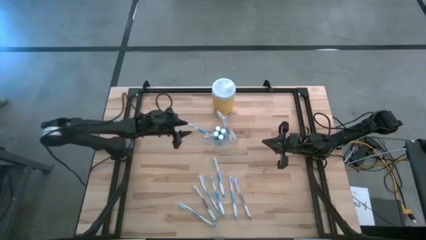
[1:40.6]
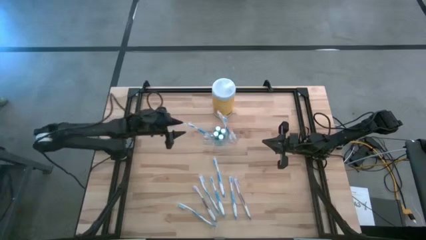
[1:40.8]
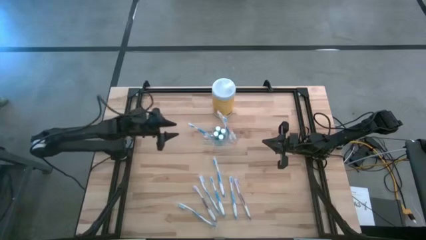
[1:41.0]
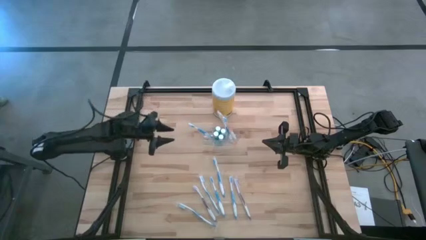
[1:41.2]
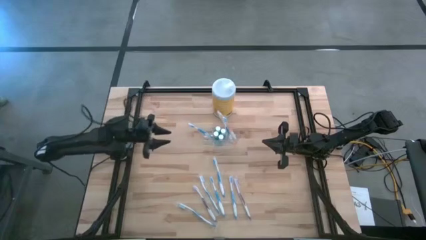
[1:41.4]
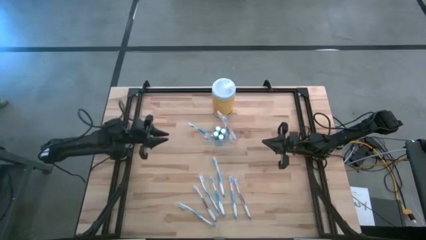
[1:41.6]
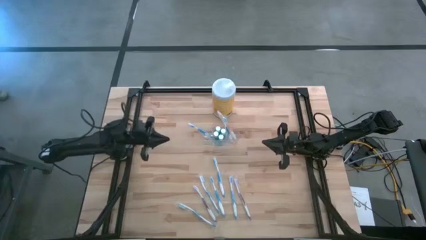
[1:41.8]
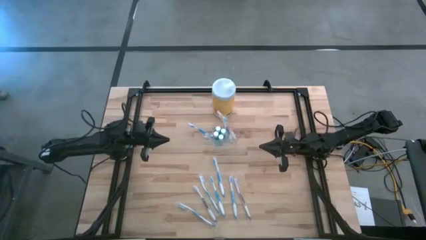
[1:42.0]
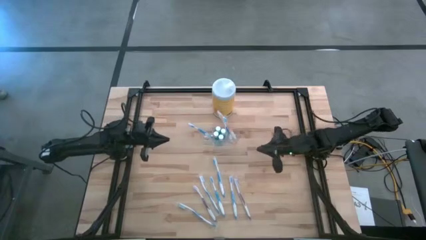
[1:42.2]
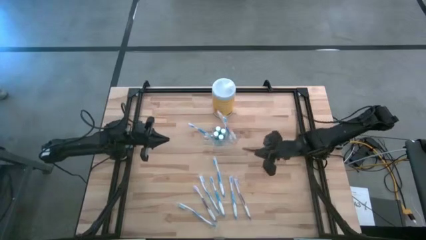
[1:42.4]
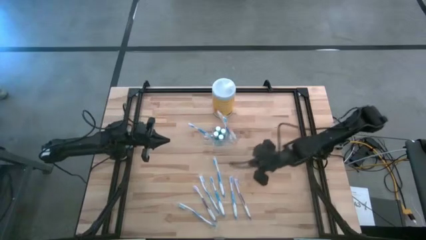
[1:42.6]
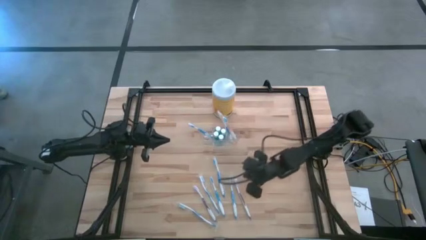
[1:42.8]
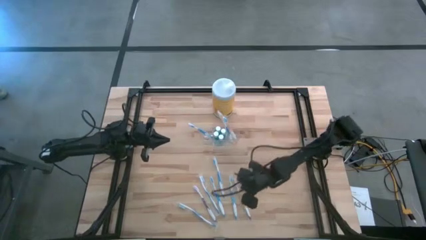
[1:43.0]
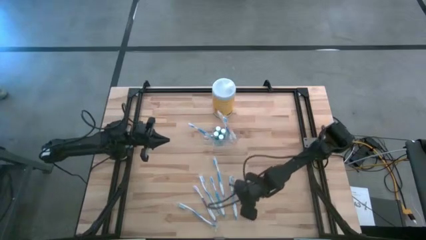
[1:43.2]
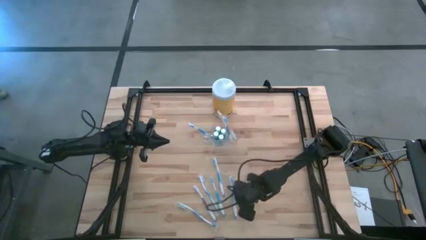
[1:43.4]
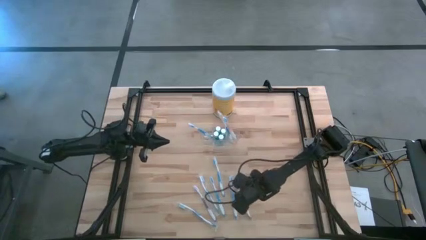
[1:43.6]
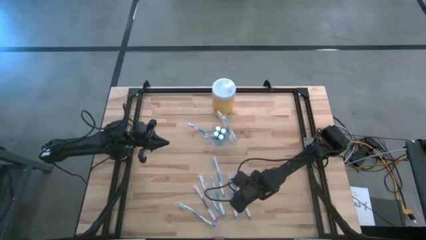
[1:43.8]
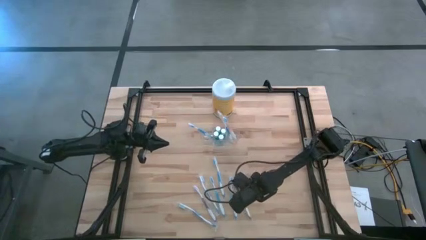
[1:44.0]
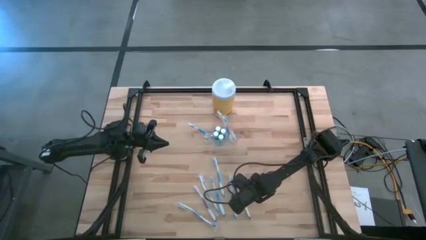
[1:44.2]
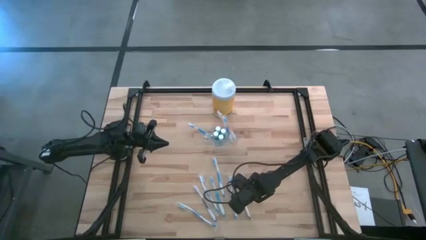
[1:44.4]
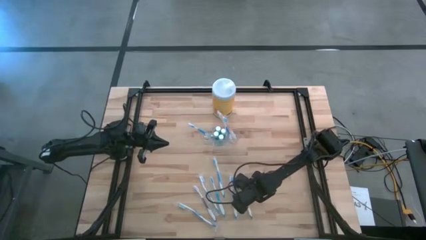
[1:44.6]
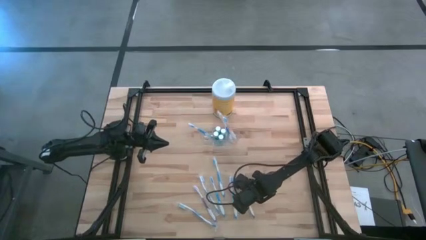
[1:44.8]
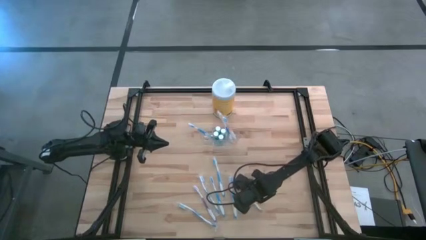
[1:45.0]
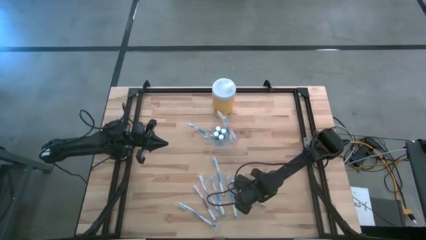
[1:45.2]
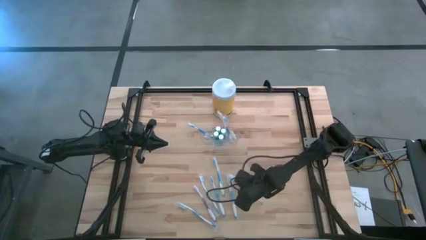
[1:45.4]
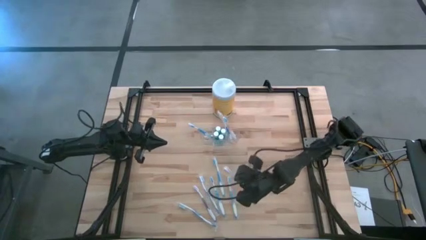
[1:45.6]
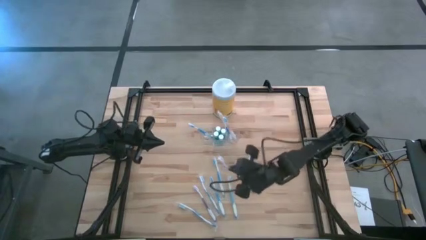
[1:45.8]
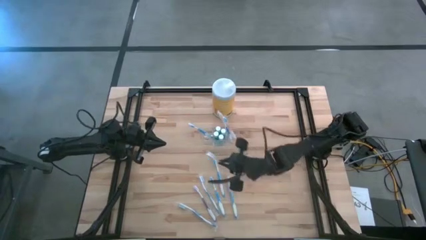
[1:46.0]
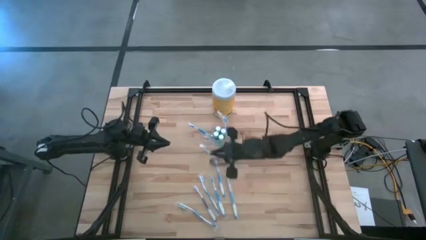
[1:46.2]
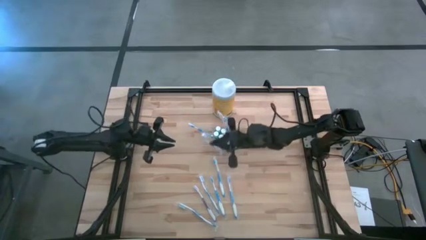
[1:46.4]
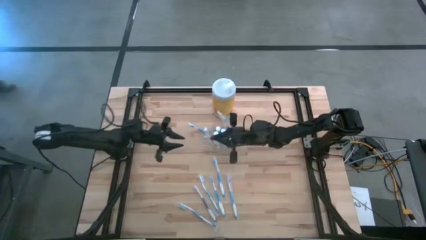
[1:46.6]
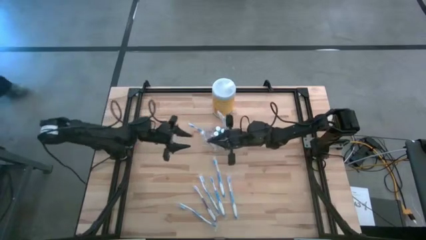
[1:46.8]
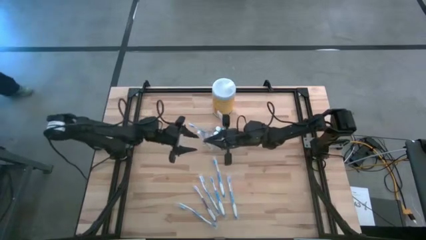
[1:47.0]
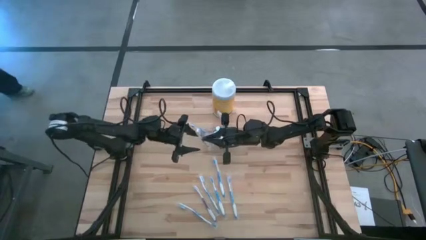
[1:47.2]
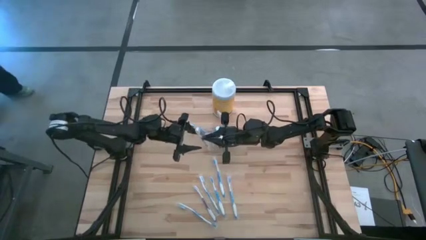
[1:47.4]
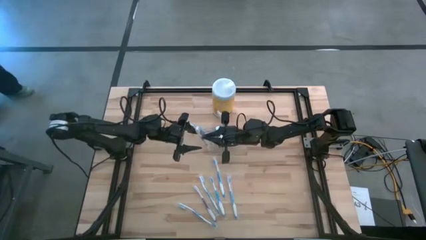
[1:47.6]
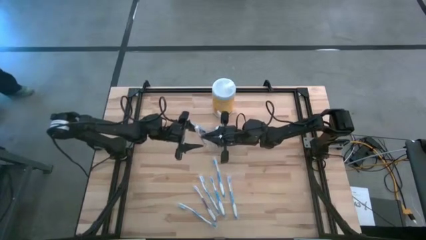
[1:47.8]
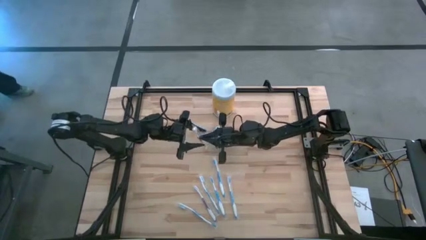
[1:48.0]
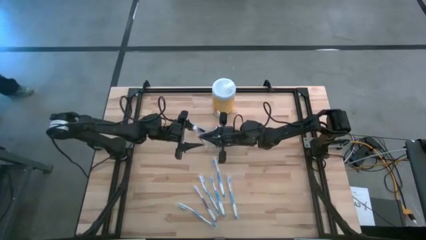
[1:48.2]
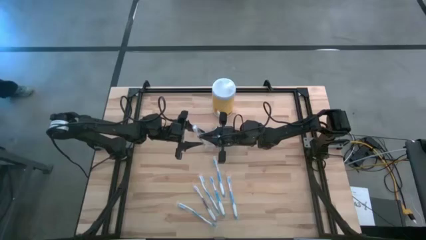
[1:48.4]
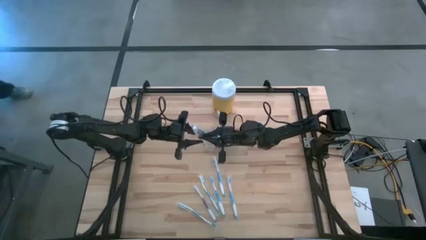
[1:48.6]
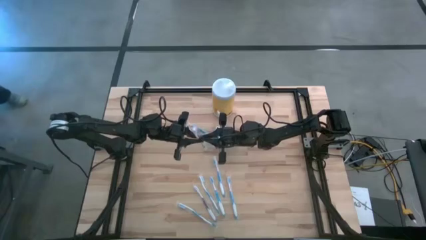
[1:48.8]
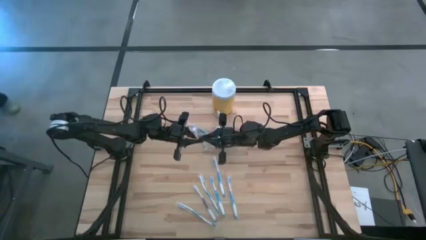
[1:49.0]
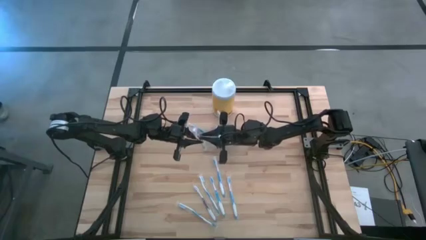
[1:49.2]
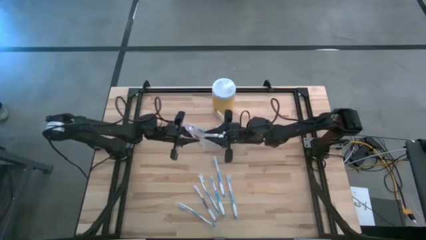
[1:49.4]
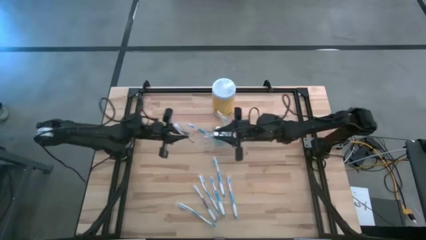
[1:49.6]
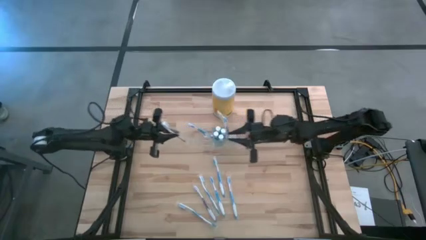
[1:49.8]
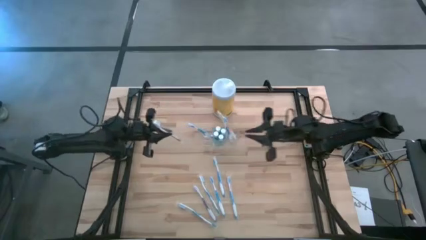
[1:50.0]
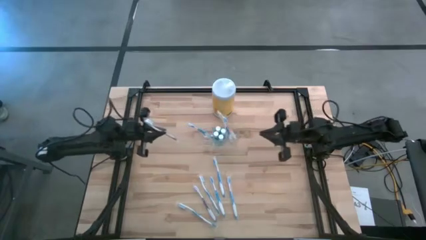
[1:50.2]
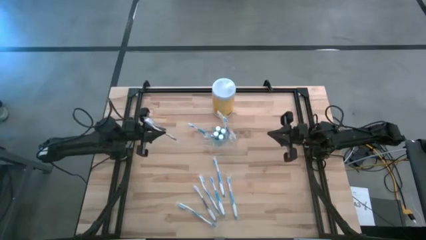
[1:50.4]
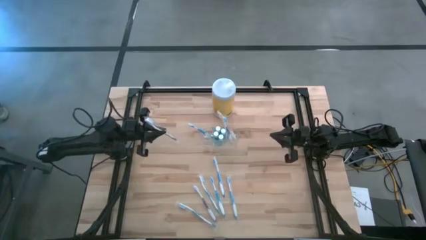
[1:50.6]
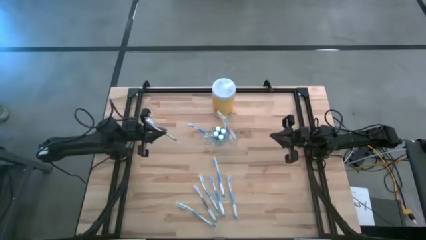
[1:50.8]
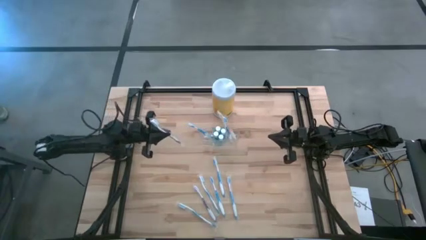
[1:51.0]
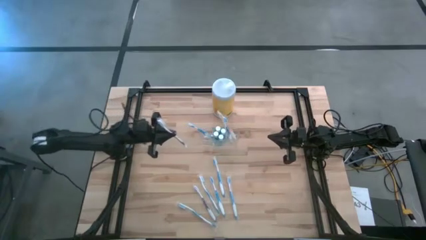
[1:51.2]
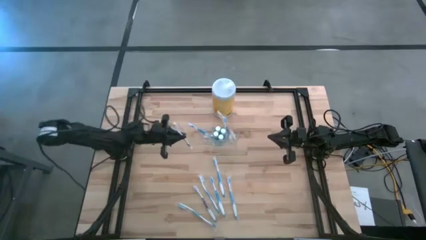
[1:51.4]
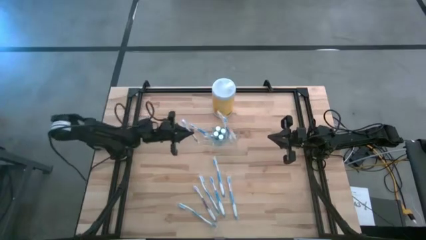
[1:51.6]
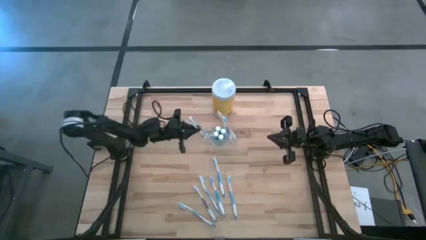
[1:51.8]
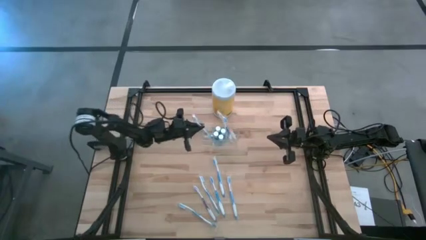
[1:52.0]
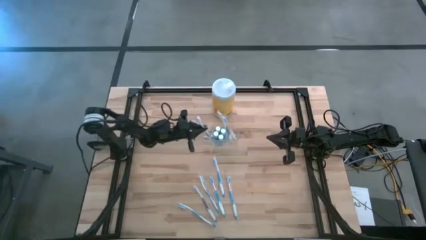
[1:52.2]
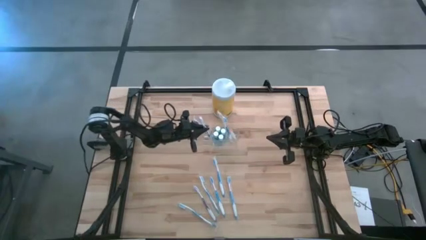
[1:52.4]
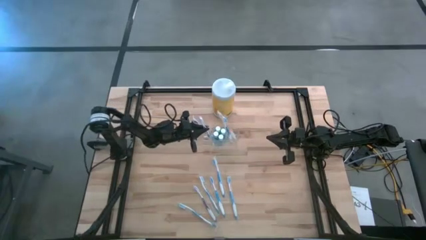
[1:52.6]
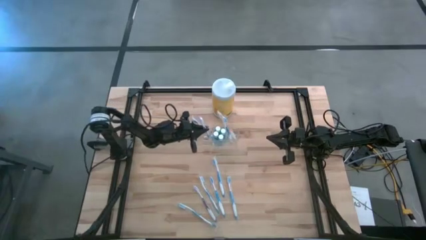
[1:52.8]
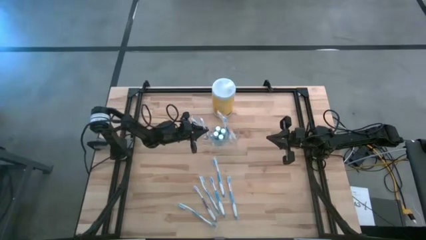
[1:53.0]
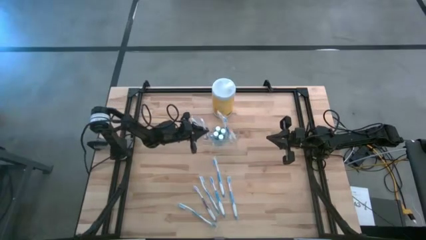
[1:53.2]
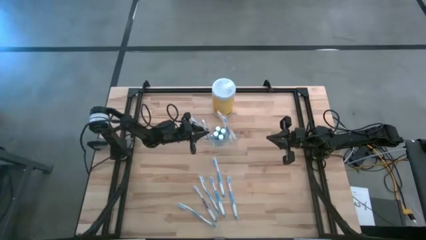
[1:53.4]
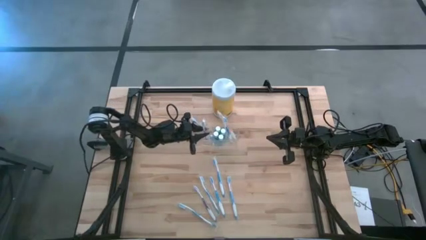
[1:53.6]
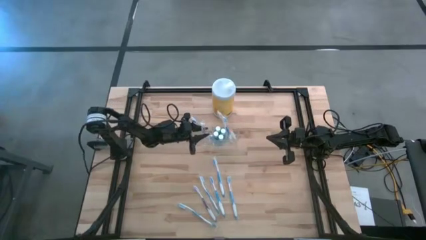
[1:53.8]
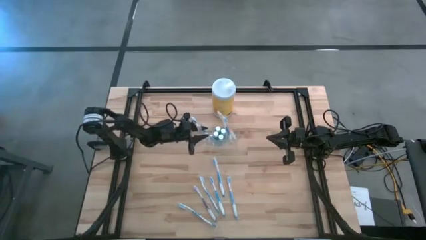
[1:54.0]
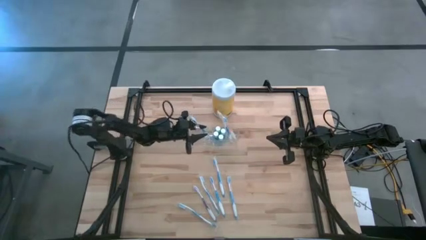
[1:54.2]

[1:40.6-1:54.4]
Task: Pick & Place toothbrushing station
Put the violet toothbrush into the transparent organizer
